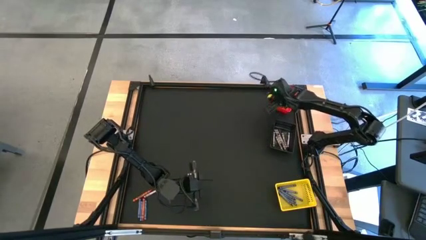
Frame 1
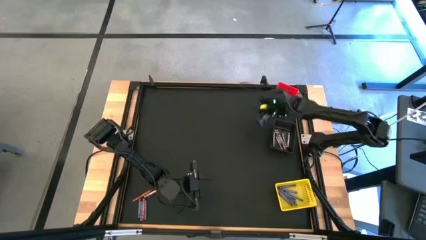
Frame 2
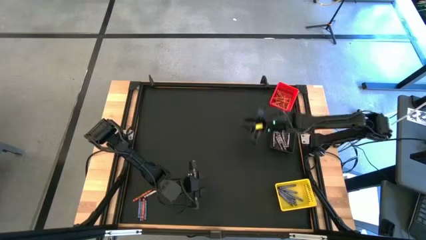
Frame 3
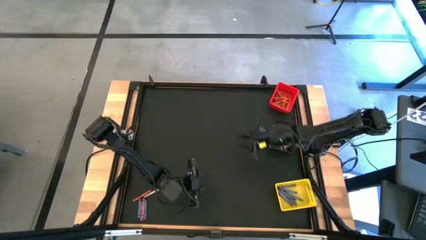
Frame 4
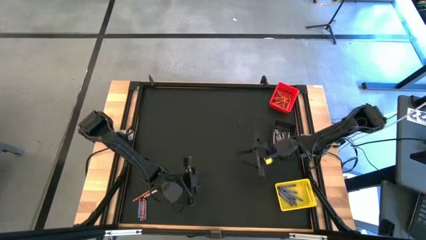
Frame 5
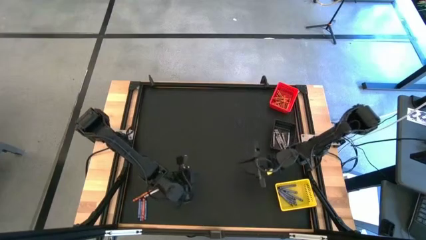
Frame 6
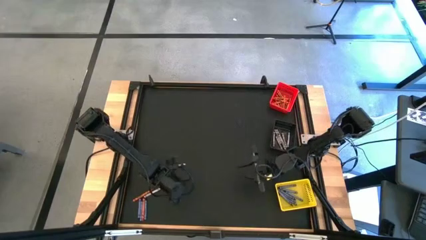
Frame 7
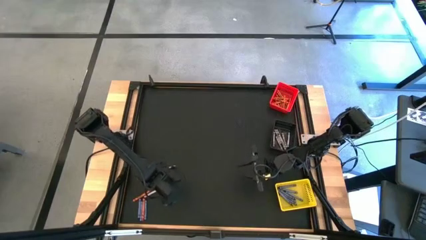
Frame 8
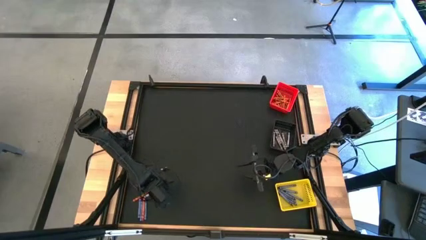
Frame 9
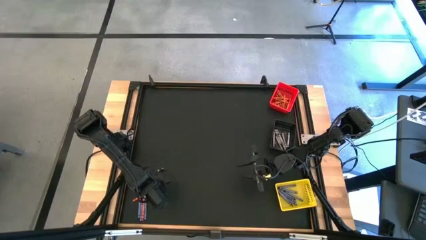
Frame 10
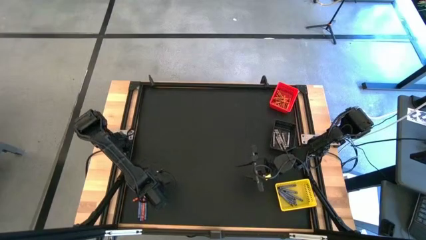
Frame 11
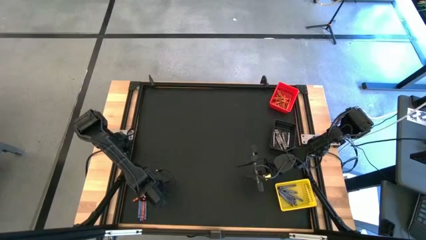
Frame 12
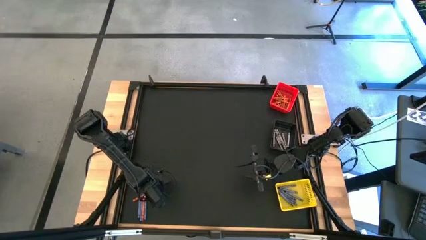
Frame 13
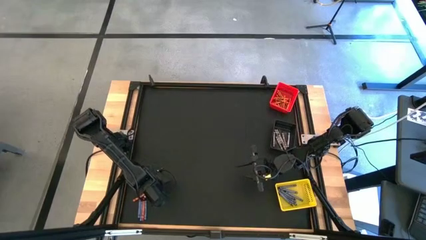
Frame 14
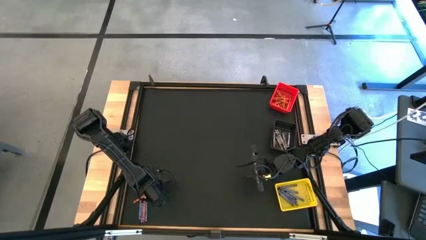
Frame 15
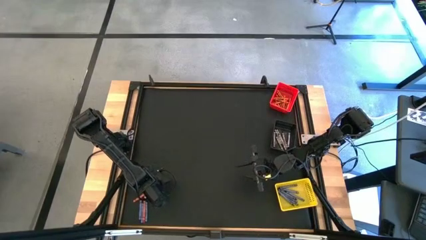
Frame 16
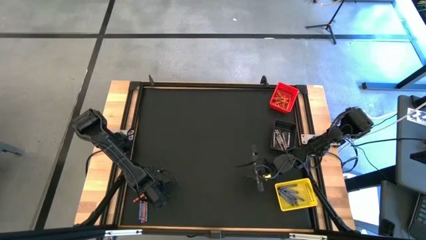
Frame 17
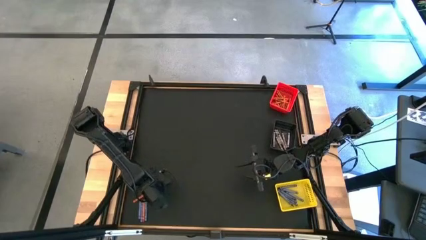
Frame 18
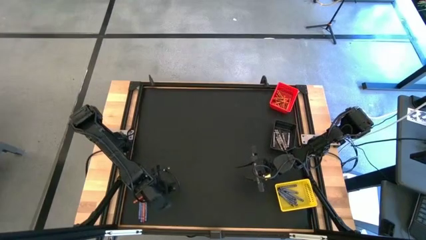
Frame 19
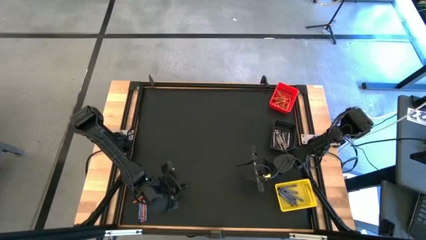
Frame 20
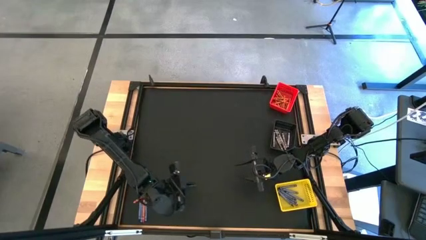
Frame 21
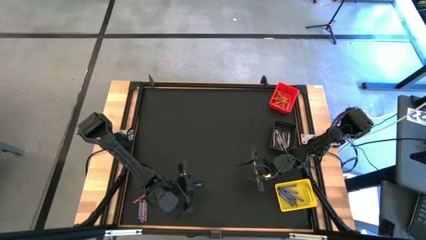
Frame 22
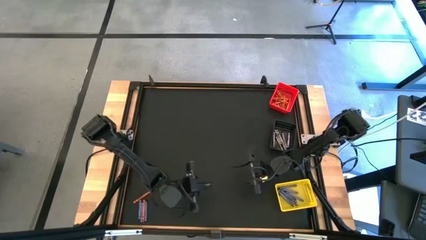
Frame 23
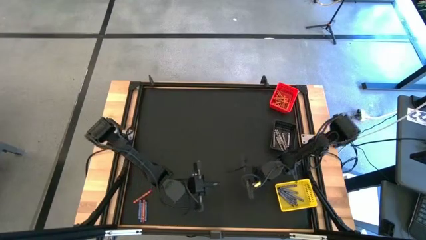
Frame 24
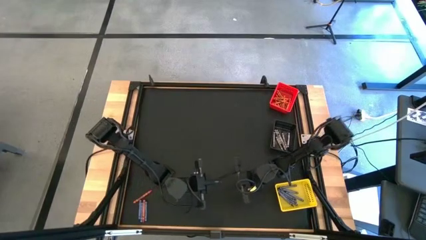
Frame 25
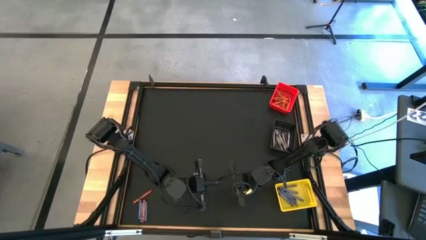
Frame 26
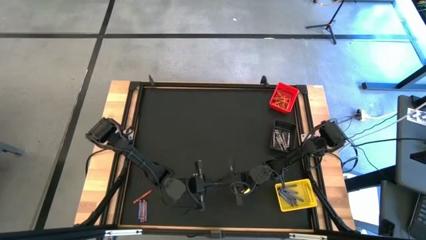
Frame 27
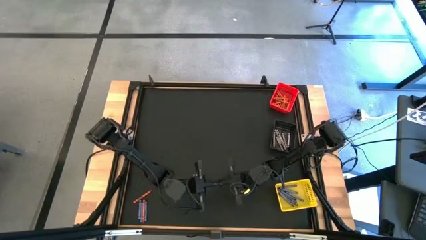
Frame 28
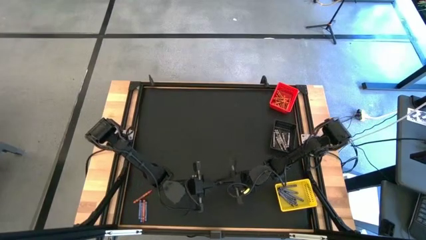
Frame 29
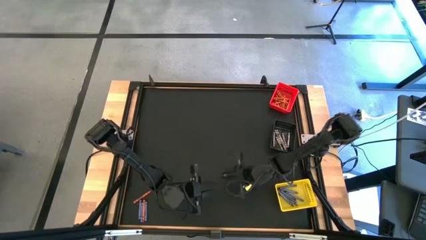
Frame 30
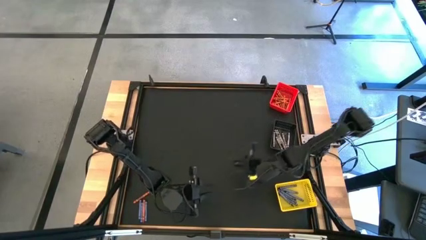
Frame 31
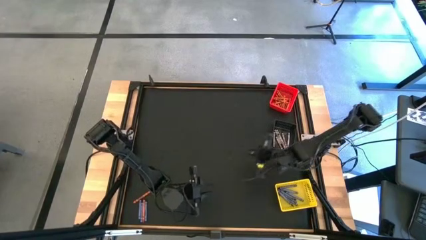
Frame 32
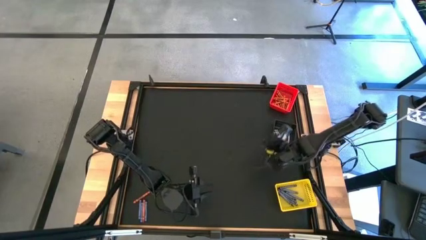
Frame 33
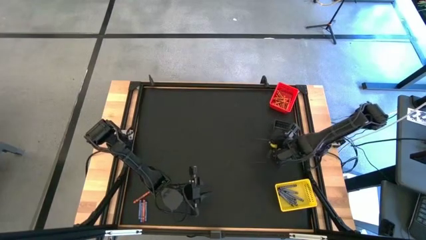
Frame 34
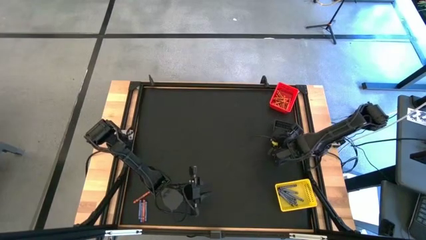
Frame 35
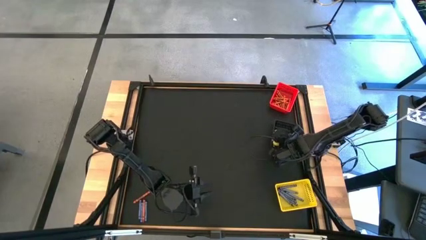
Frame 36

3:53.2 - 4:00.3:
Task: Sort crayons
Put the black crayon into the black bin

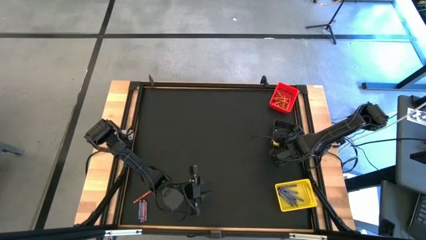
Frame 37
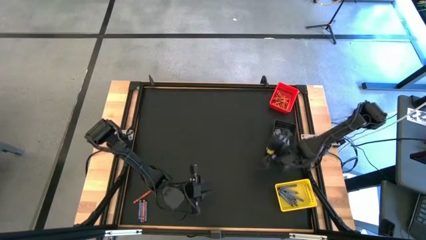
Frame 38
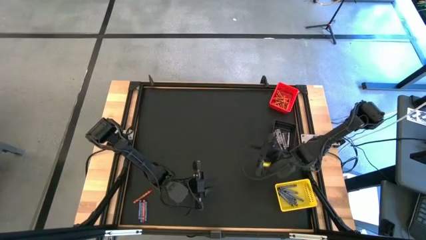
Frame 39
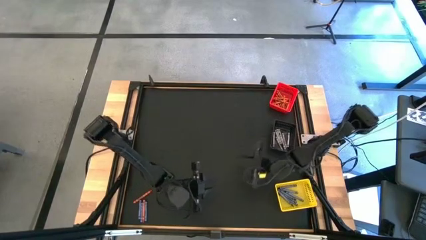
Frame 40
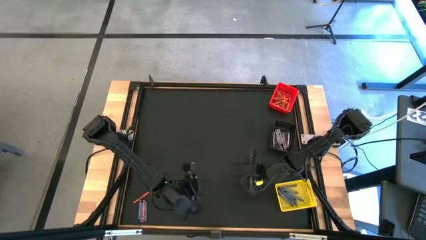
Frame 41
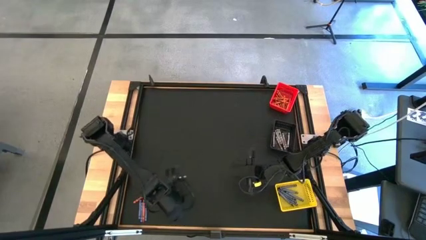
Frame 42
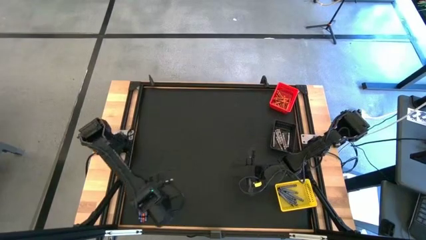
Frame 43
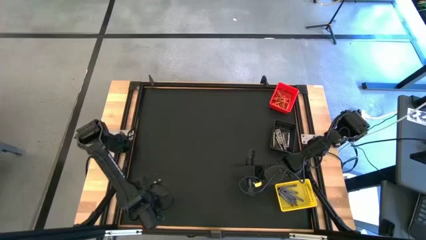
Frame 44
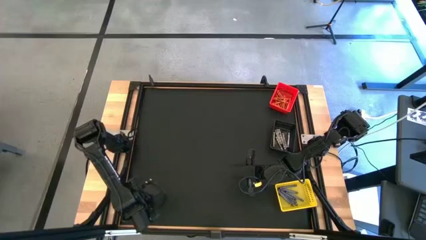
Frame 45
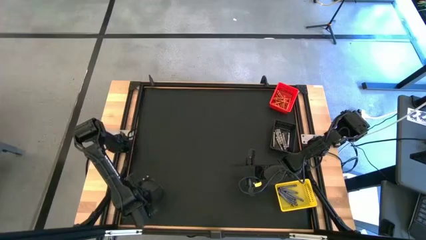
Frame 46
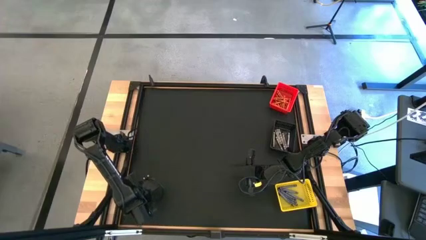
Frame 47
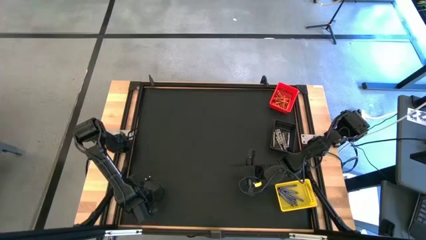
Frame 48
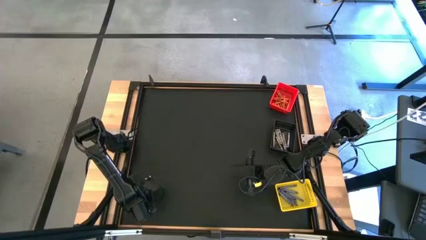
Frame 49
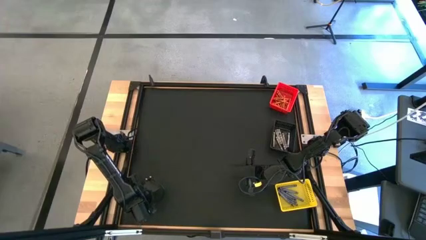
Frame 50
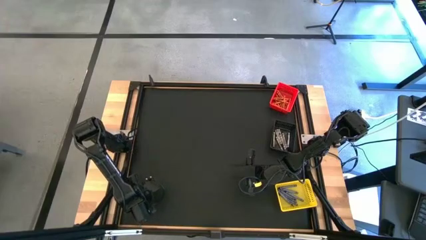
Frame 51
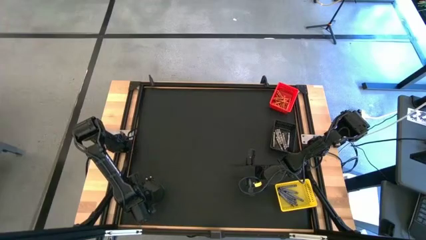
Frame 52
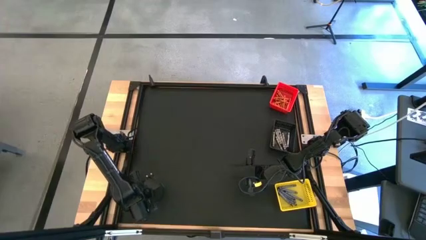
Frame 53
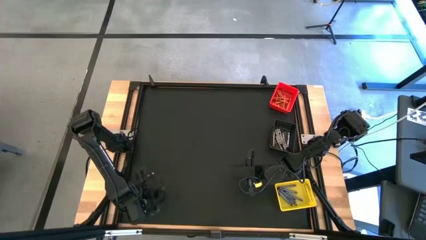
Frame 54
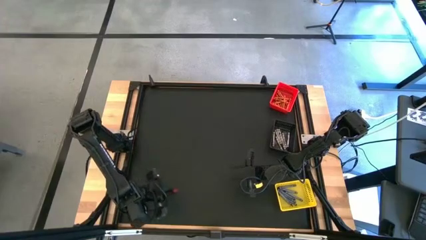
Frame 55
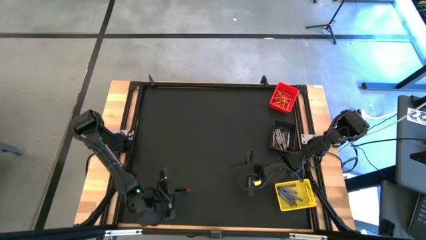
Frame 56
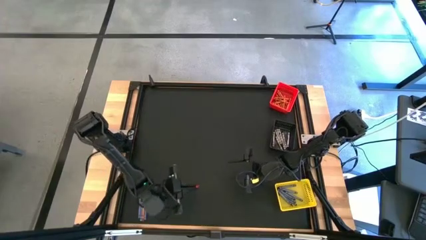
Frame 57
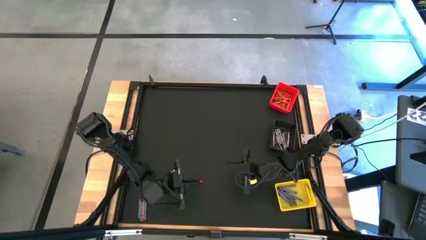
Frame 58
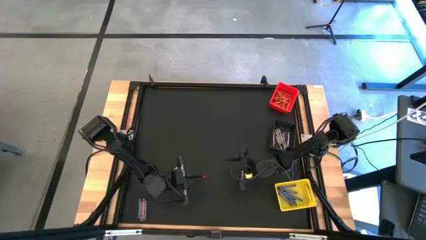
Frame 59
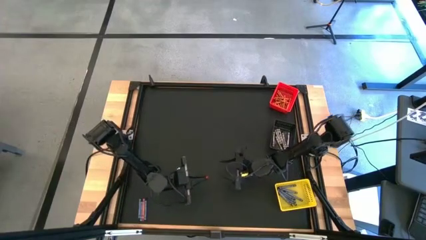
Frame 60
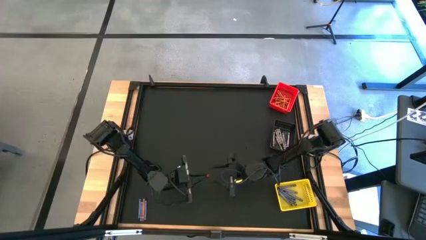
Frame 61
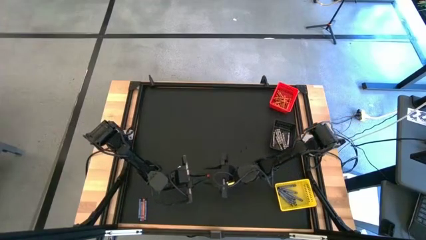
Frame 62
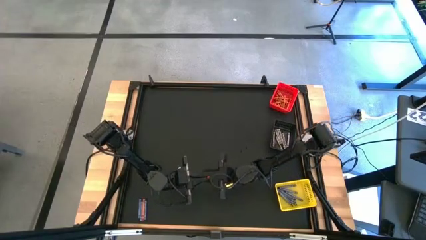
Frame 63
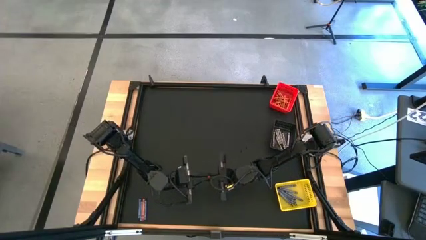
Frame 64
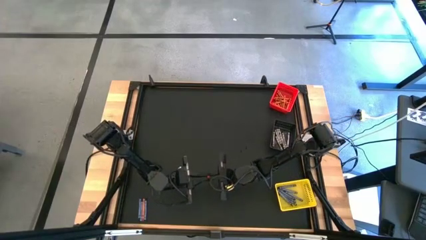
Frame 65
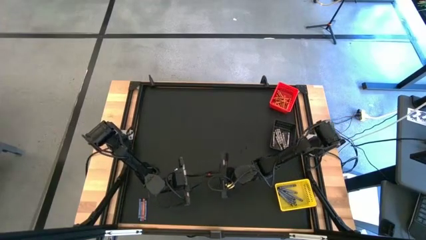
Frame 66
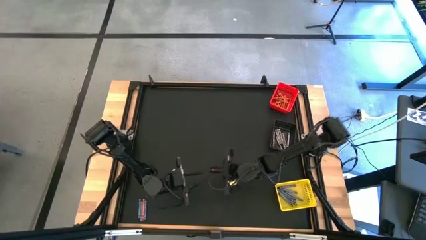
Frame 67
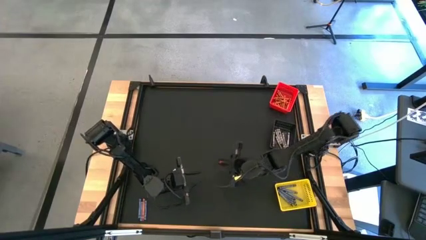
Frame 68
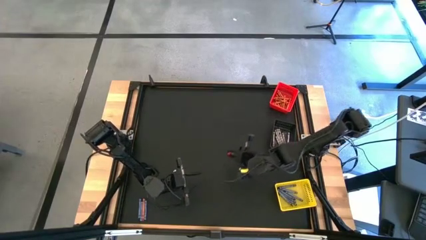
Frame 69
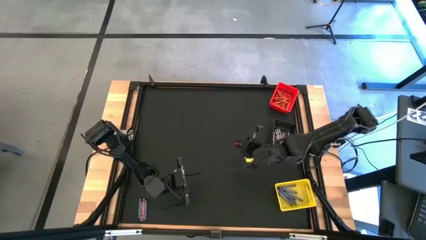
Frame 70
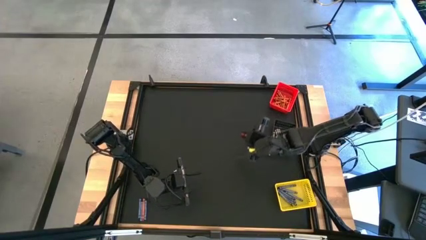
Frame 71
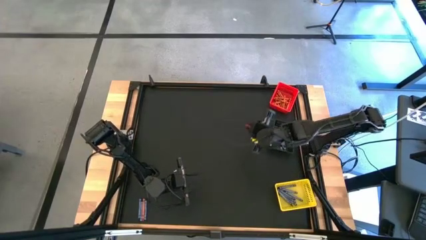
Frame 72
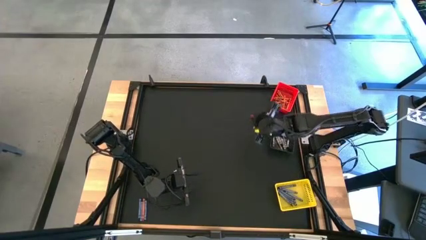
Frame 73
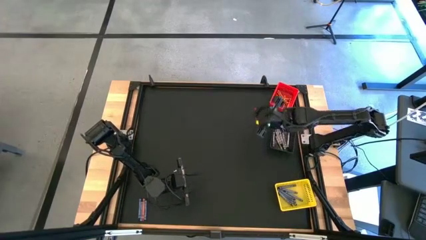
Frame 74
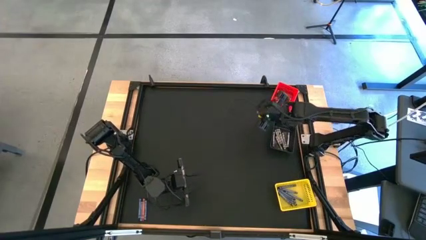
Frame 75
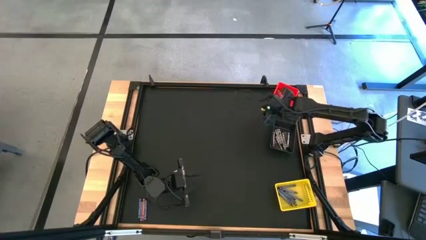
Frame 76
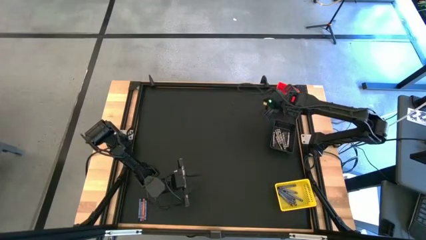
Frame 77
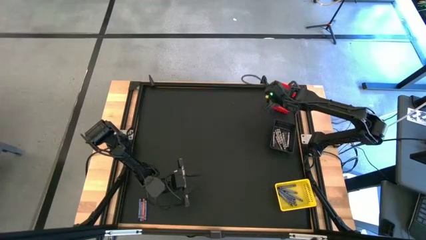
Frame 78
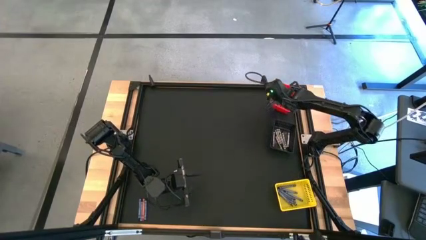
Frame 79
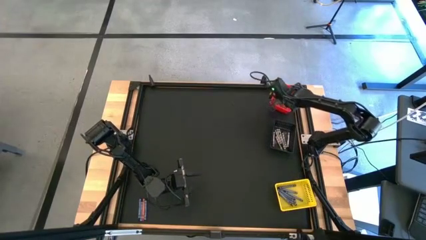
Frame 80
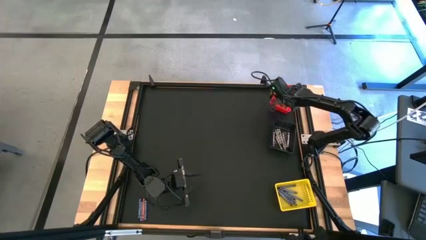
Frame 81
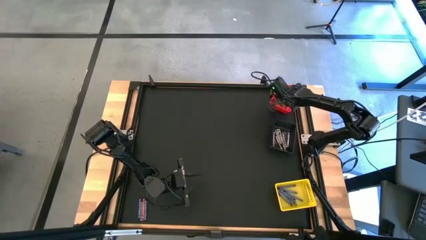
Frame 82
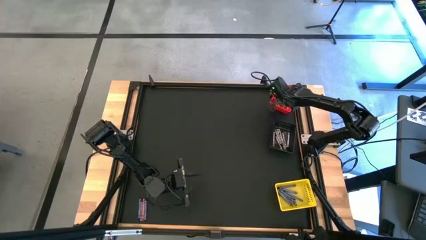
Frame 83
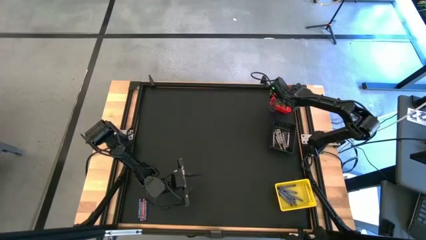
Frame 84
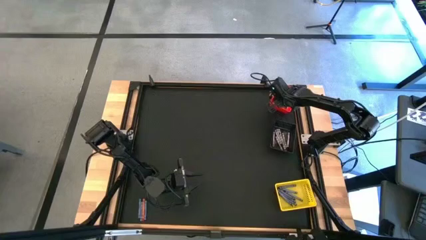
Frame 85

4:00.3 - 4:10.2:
Put the orange crayon into the red bin
